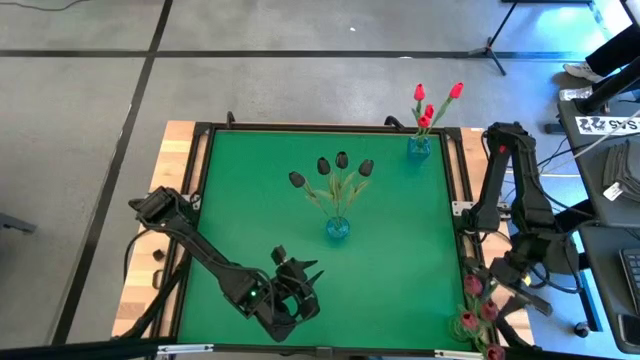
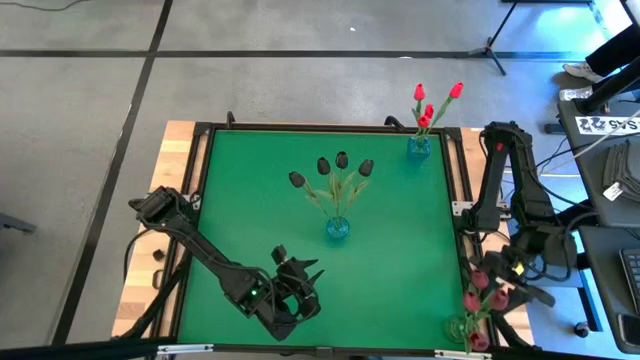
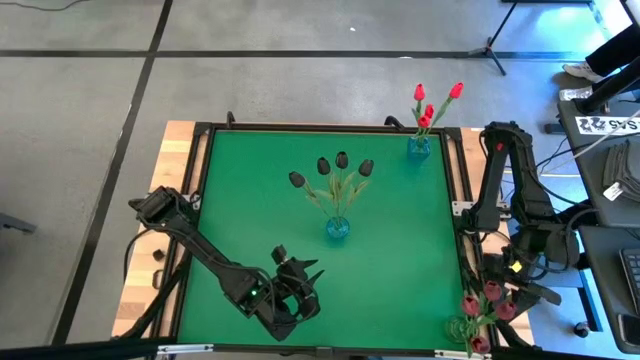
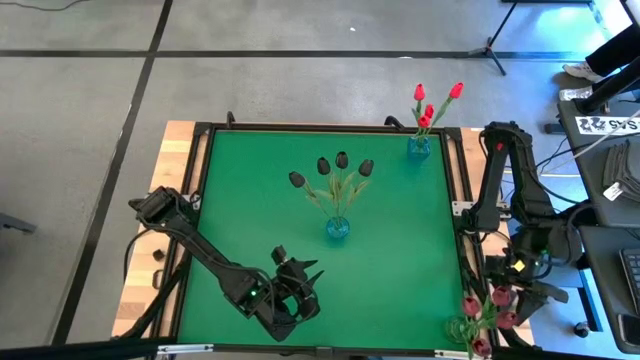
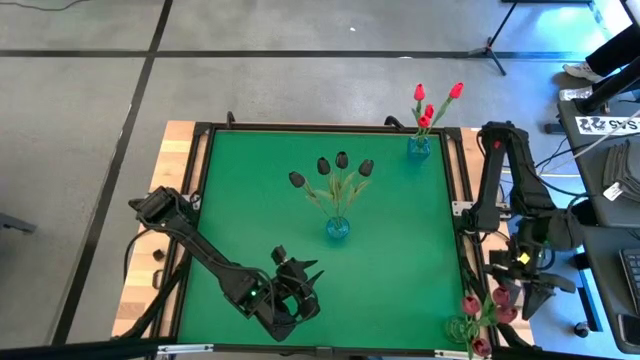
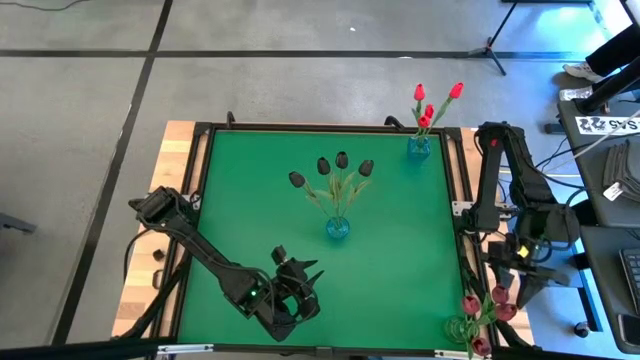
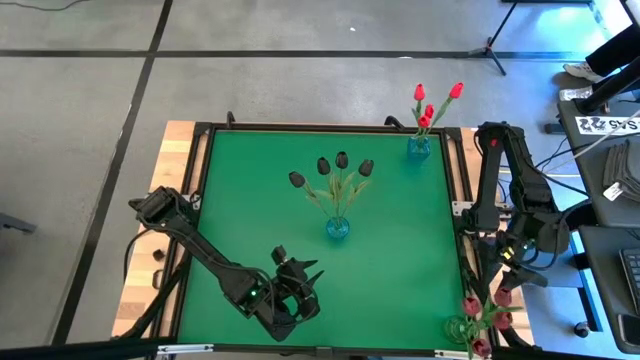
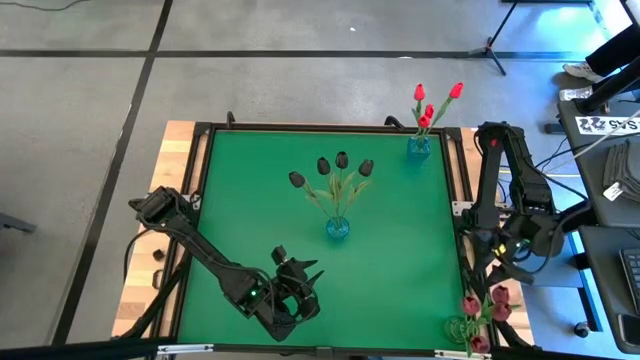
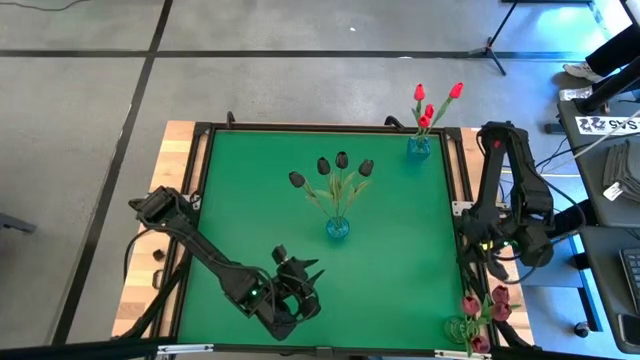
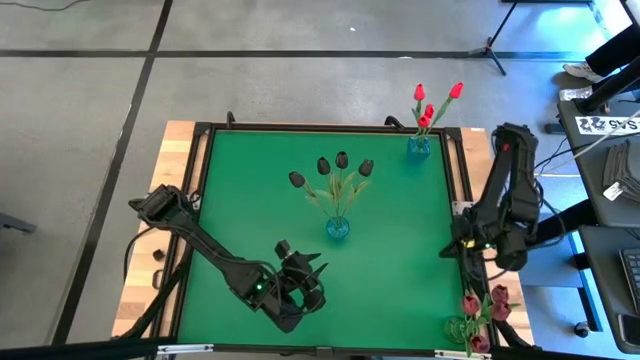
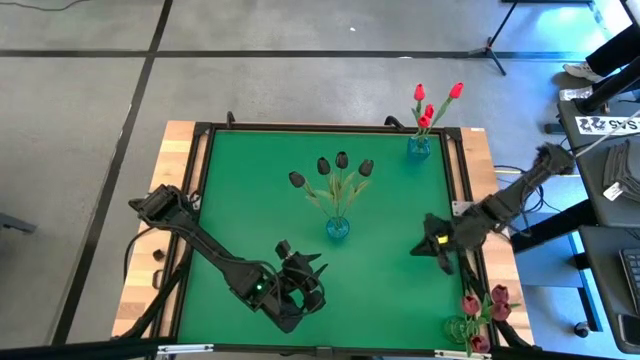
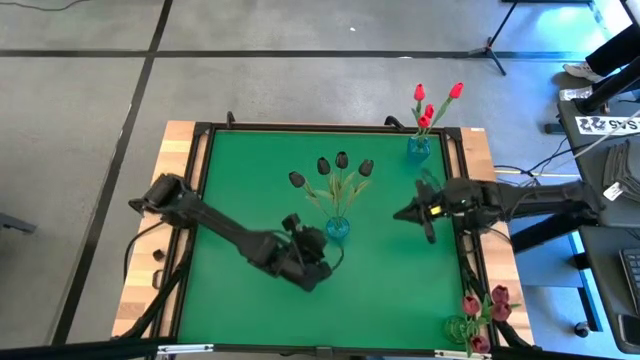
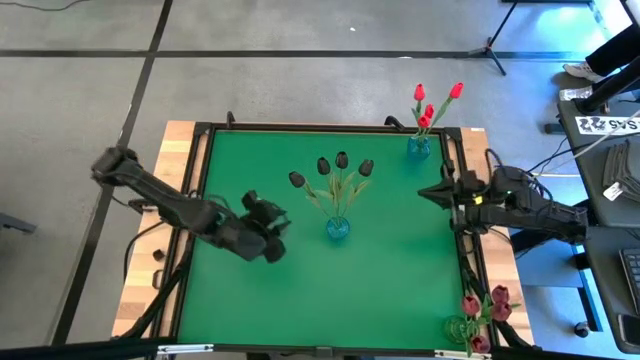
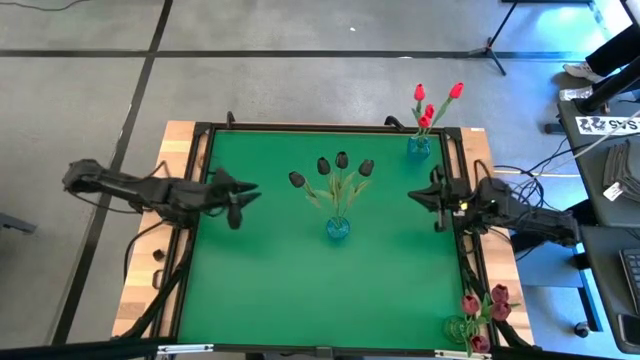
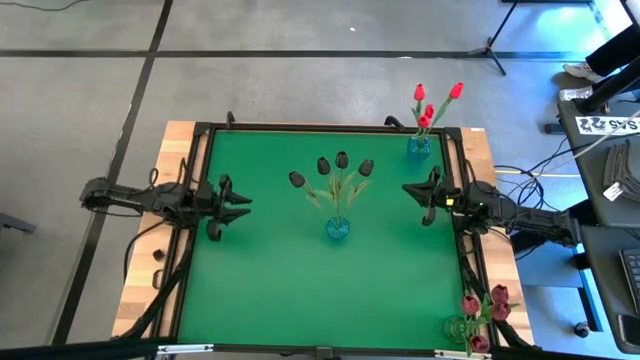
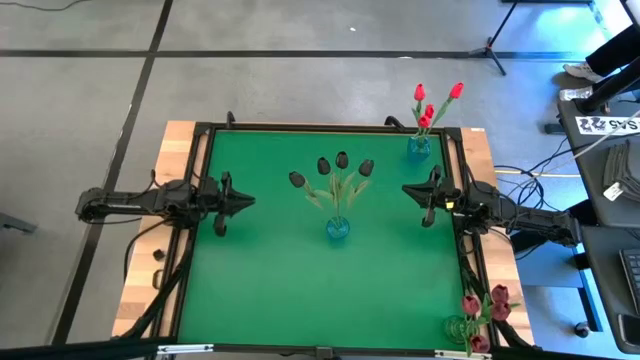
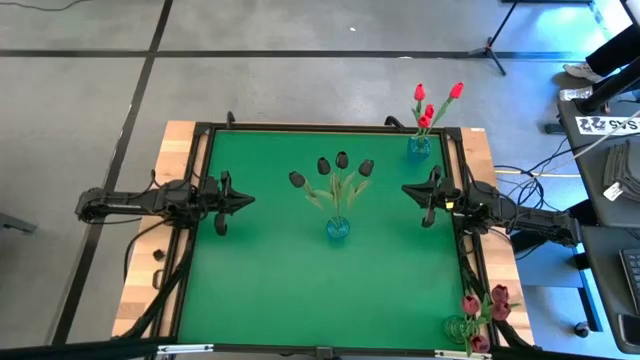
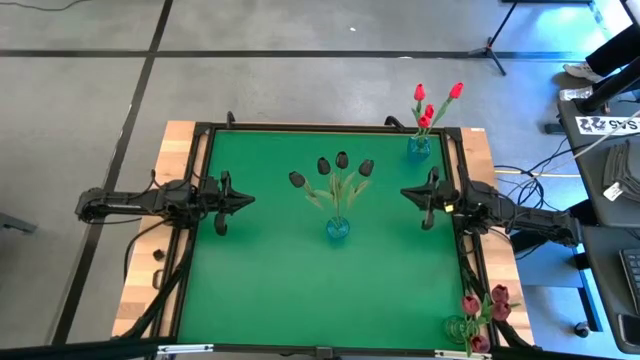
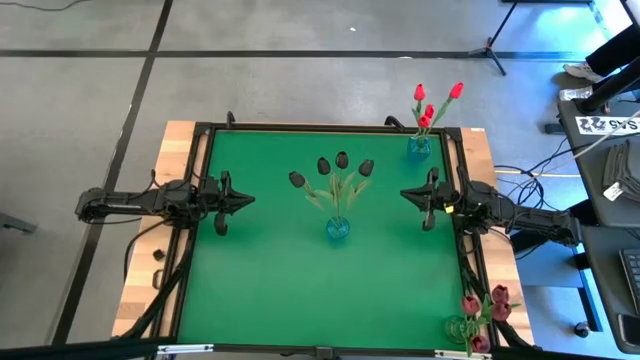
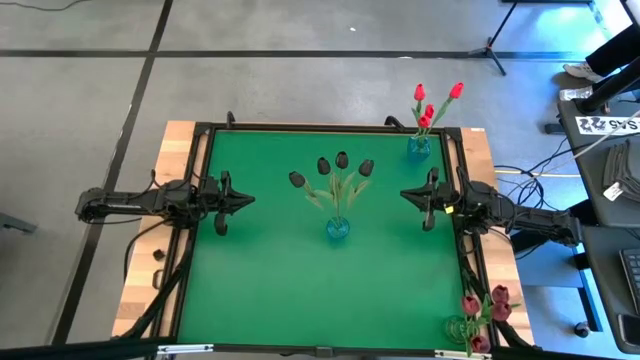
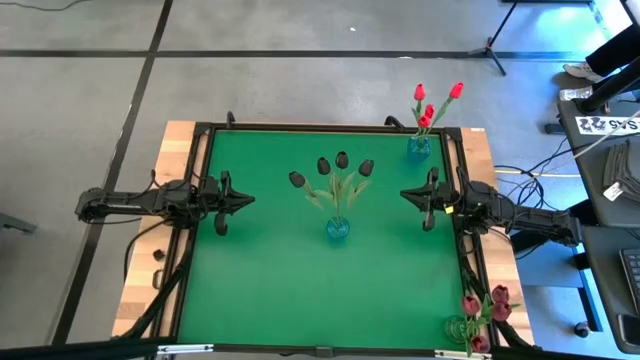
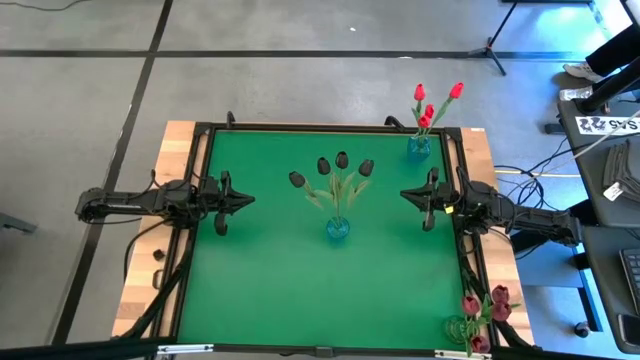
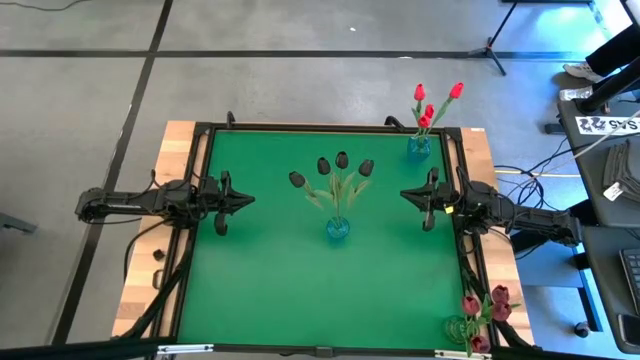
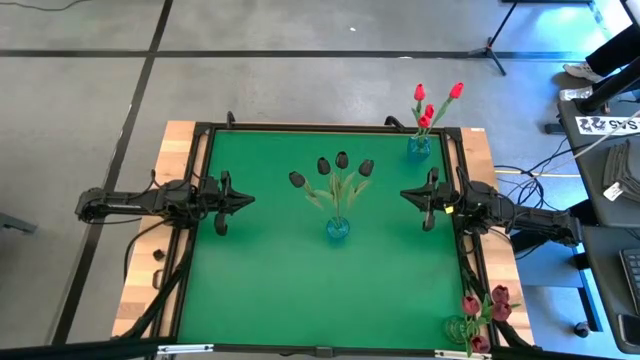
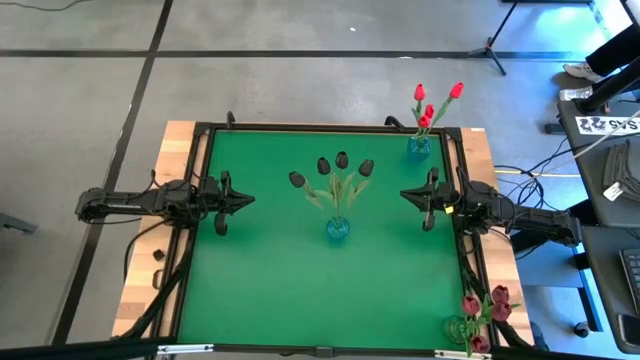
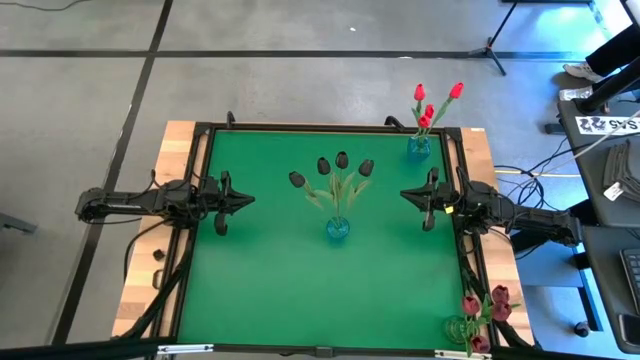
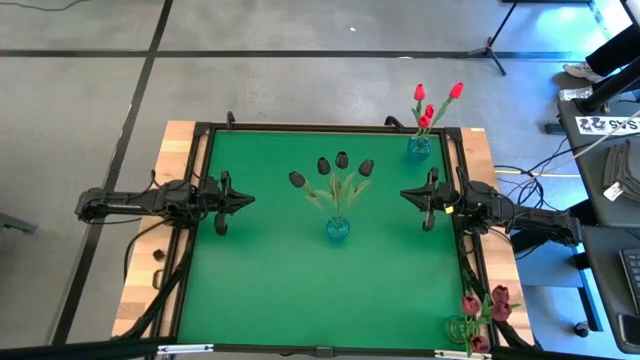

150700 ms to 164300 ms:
Task: Sort flowers into vase by color
Return to Home Position

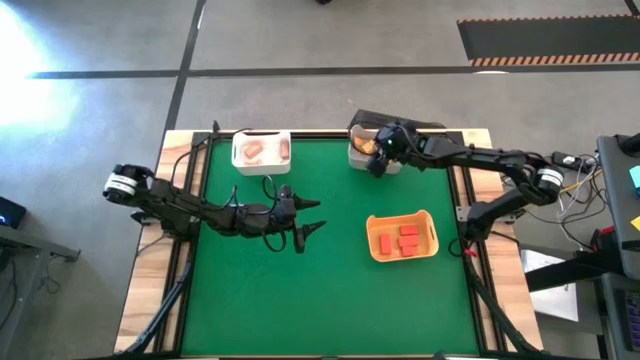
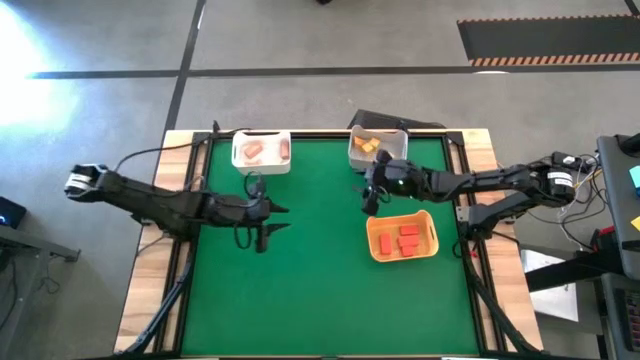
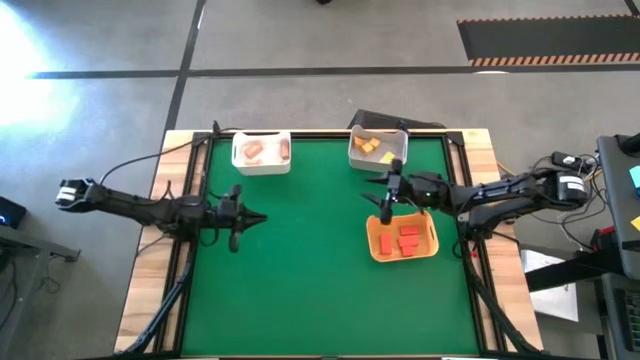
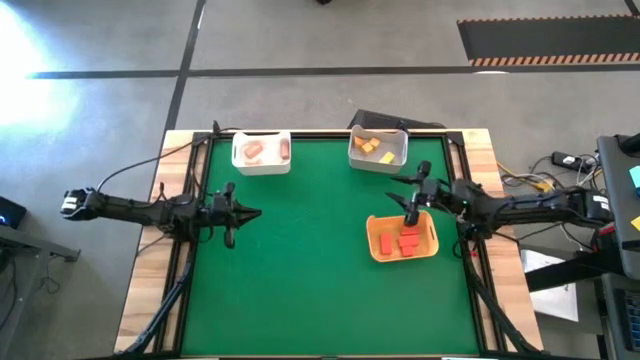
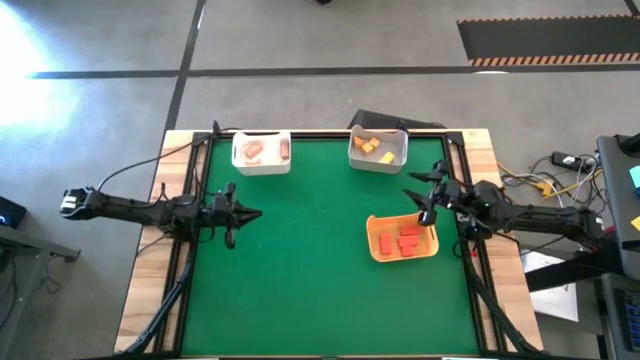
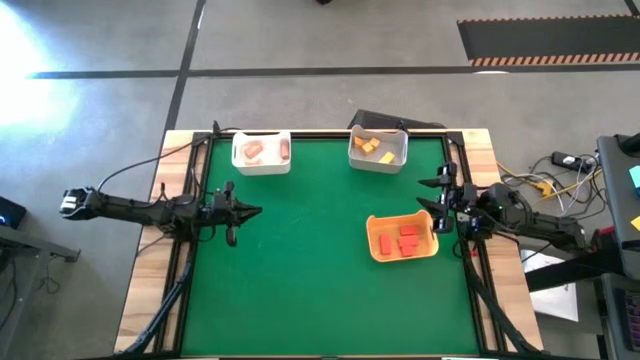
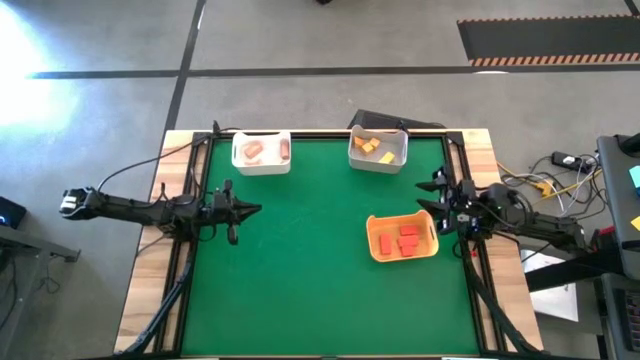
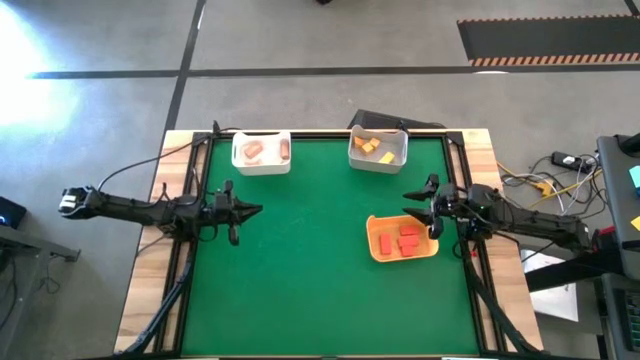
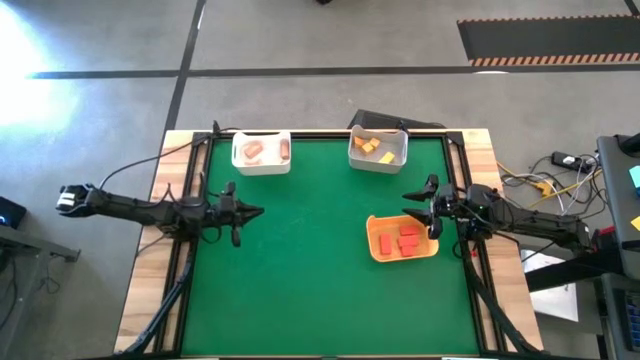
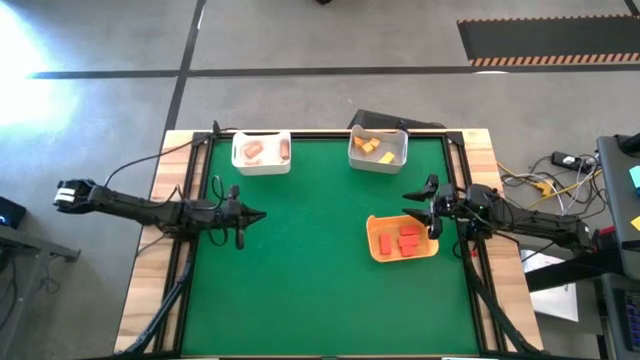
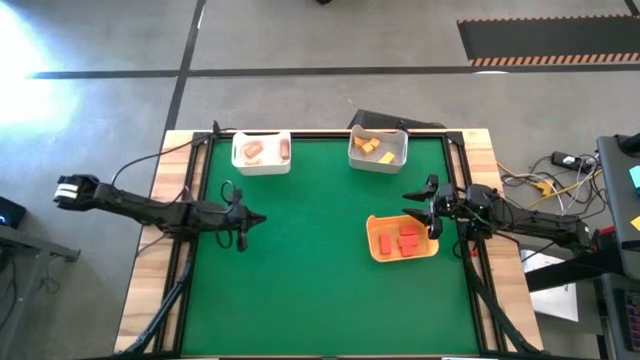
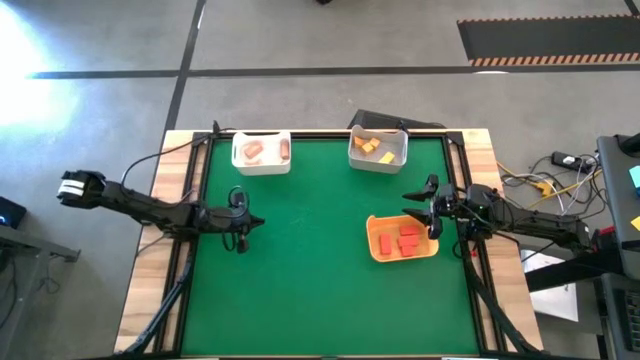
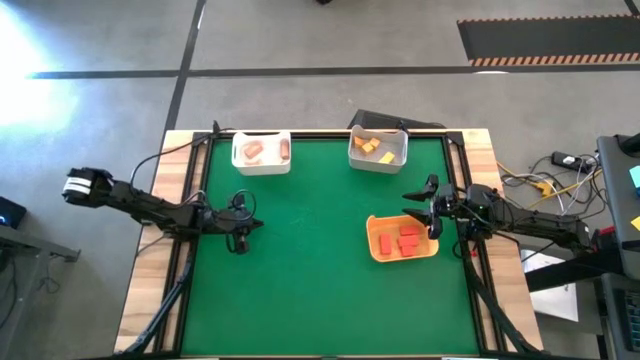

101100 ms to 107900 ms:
Task: Sort & place blocks by color
Return to Home Position
